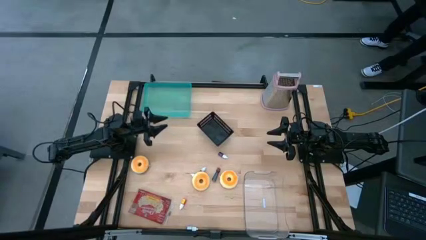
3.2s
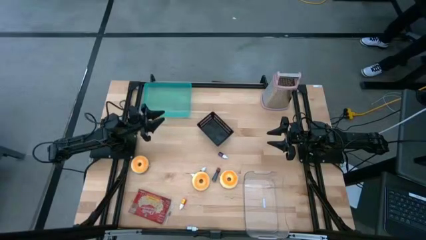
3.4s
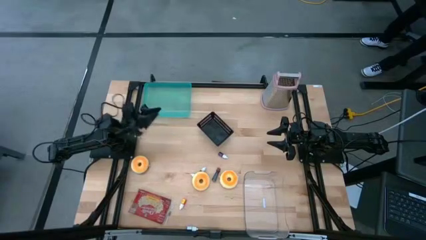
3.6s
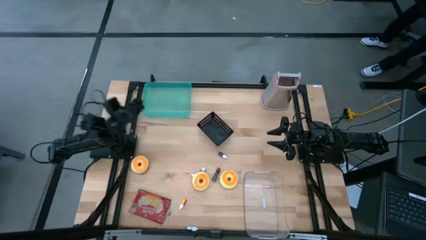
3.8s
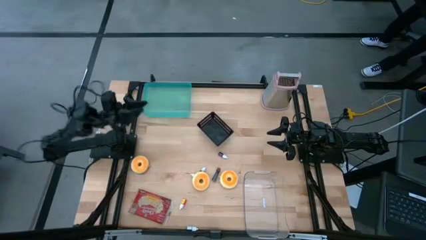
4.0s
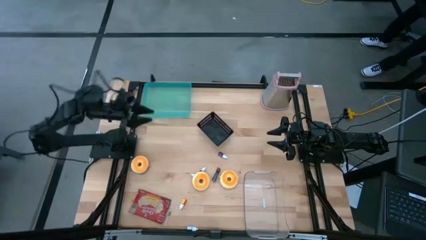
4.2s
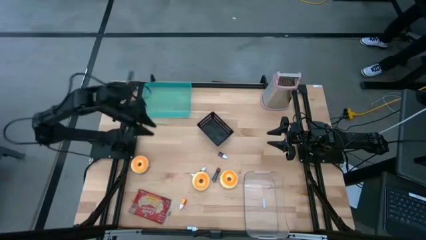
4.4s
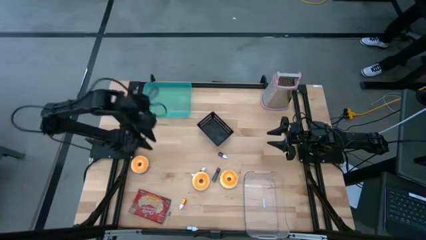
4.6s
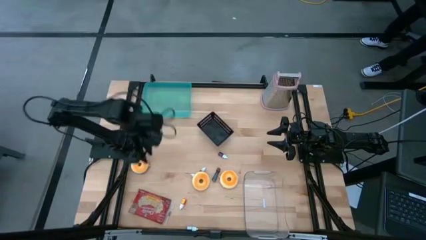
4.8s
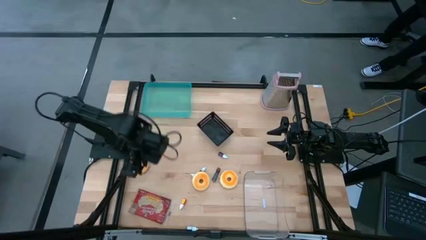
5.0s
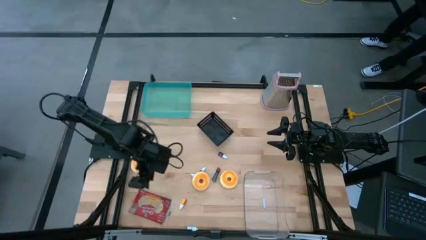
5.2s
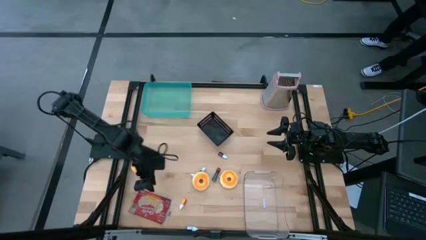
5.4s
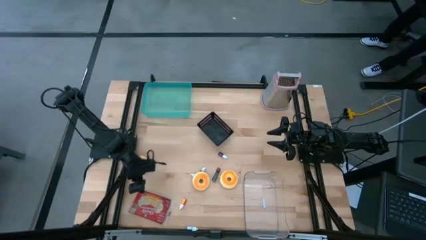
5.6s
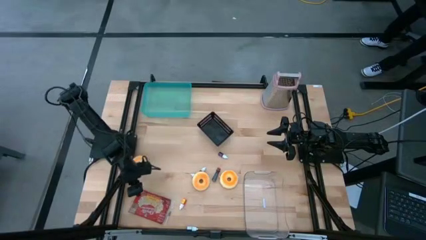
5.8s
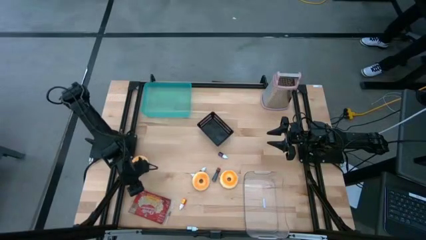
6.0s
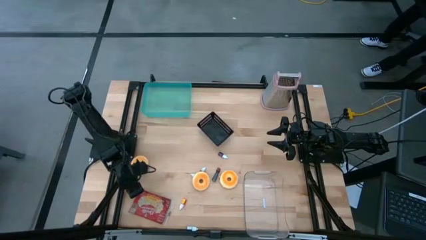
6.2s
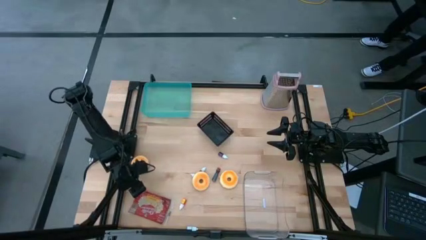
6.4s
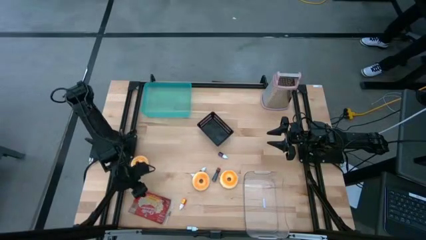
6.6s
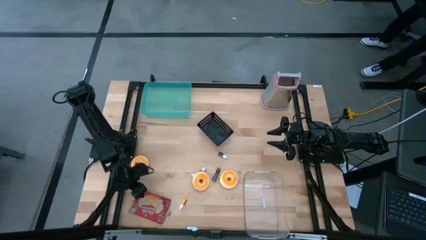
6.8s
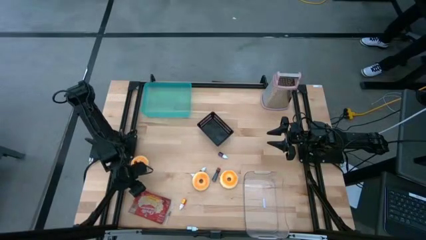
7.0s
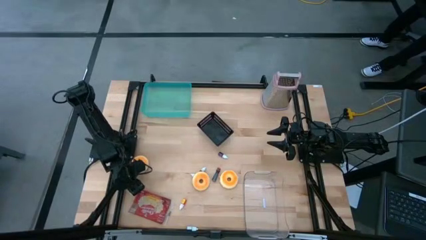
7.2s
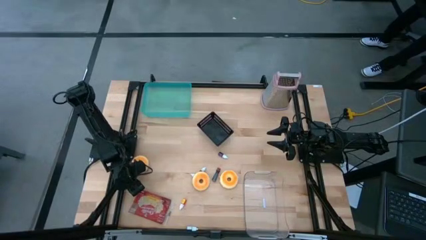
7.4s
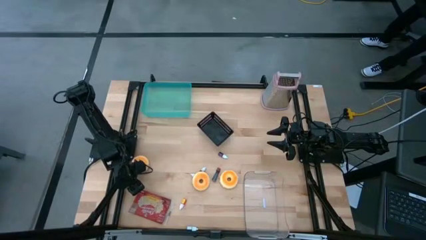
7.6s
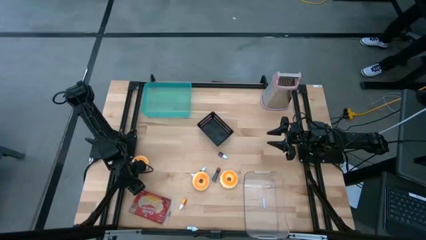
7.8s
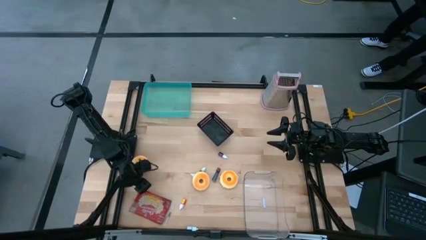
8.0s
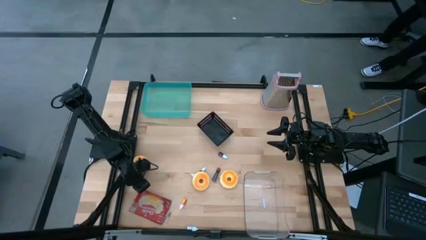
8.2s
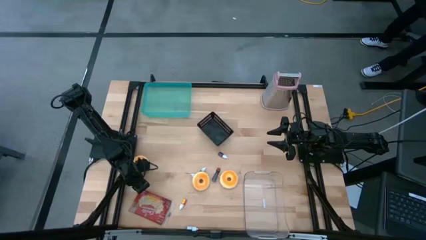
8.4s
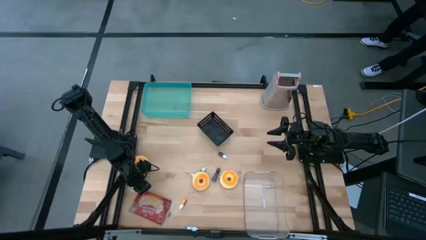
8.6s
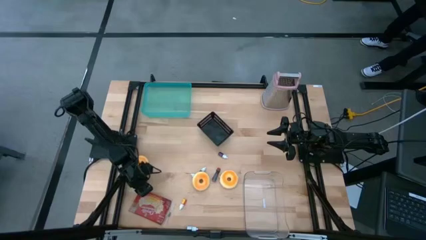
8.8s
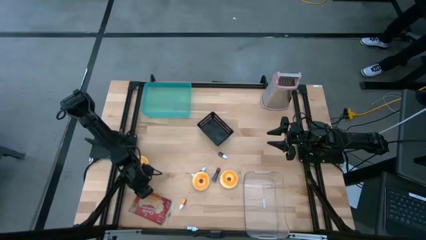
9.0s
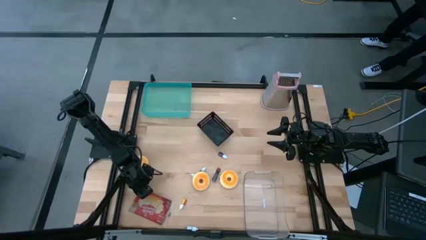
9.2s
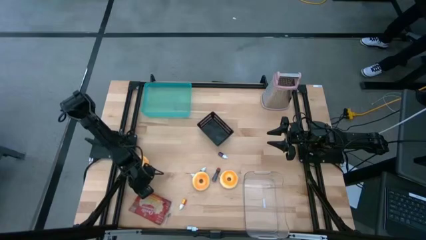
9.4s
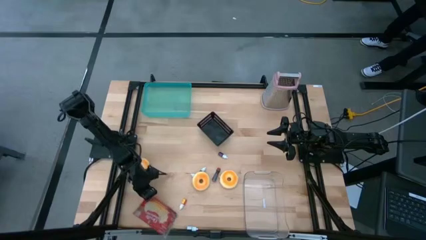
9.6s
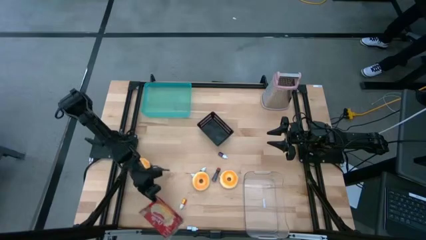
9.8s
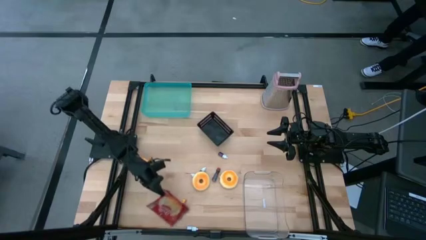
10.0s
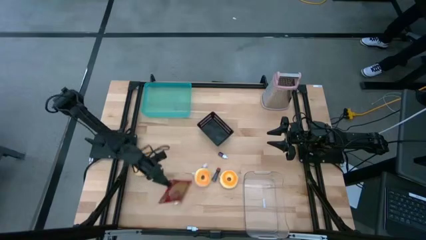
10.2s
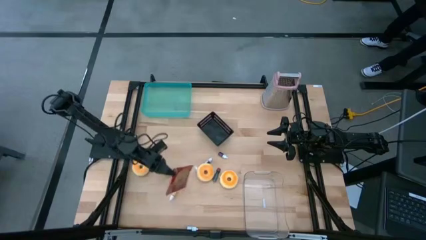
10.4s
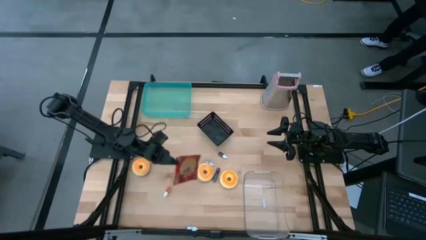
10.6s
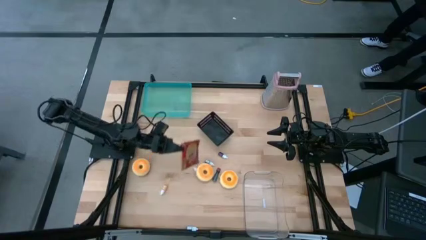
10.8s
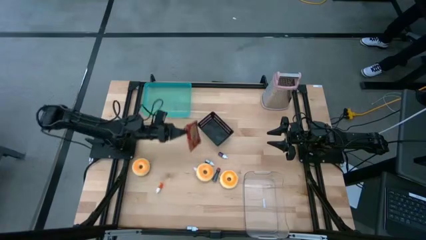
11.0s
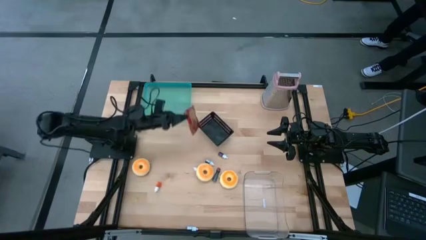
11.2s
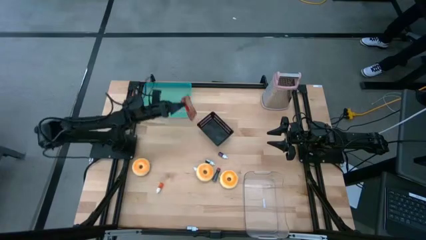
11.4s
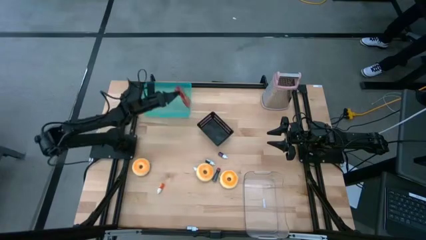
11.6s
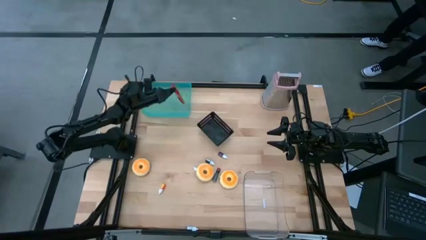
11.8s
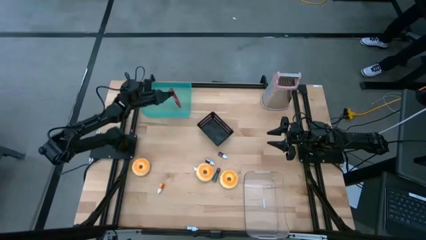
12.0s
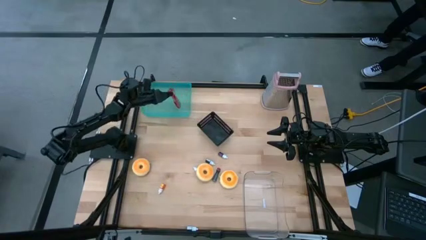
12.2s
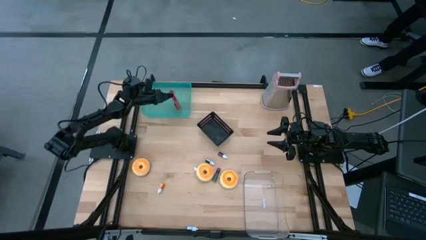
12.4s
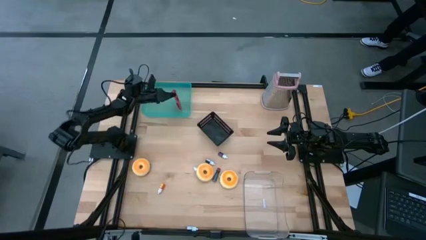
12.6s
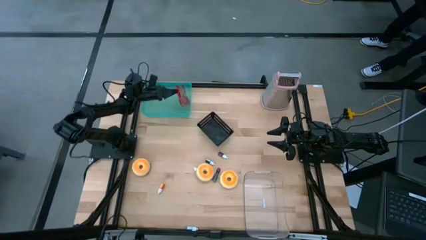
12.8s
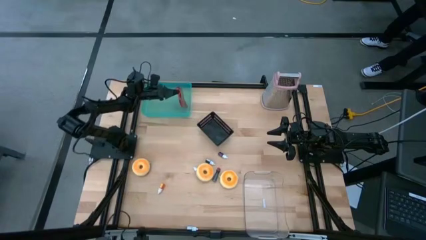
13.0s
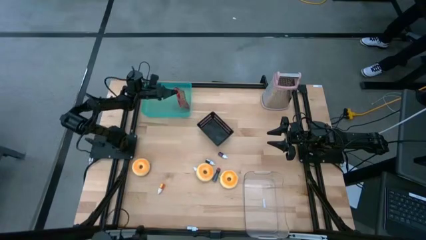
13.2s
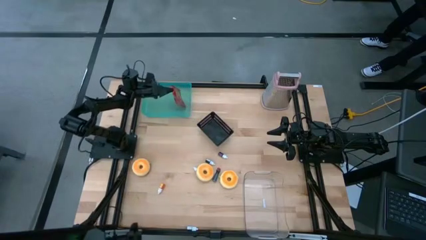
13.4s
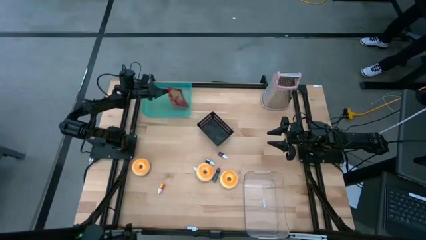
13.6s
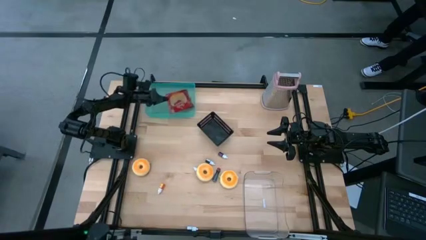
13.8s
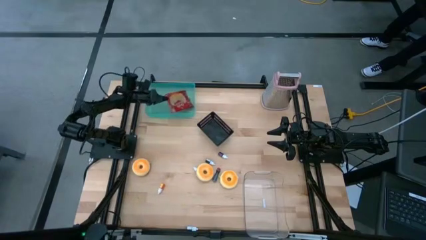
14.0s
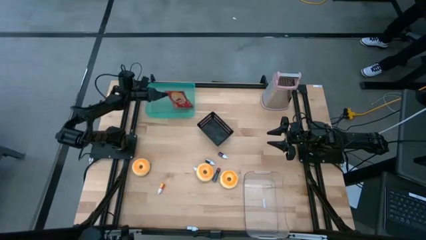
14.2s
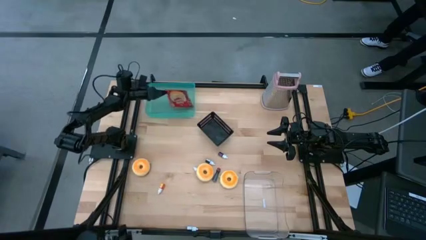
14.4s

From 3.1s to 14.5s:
Put the red popcorn bag into the blue bin

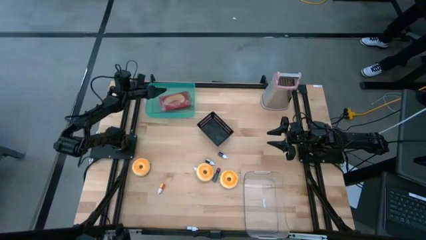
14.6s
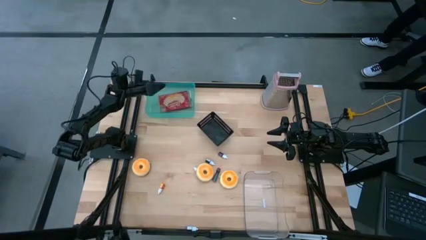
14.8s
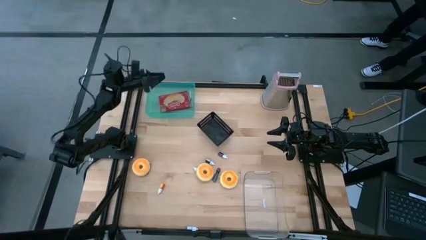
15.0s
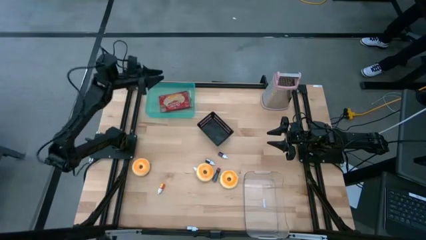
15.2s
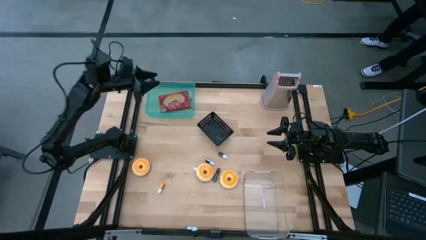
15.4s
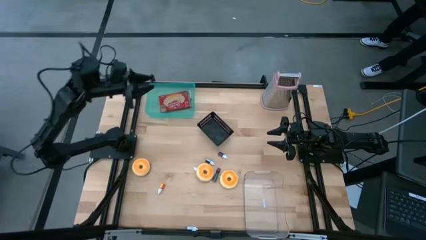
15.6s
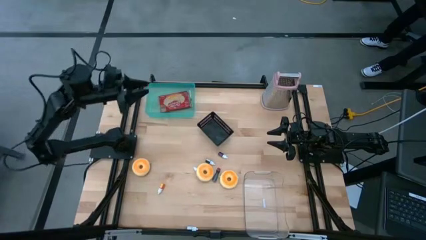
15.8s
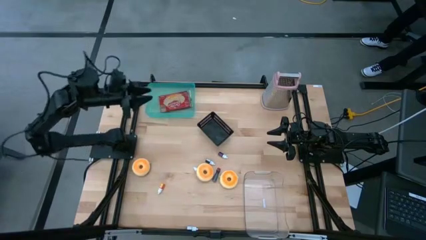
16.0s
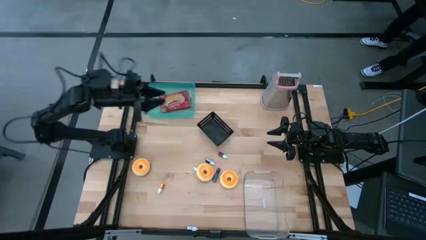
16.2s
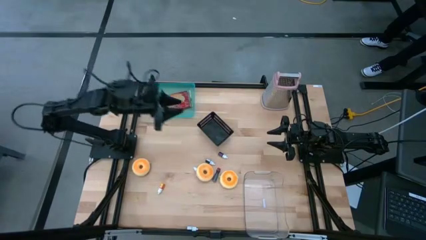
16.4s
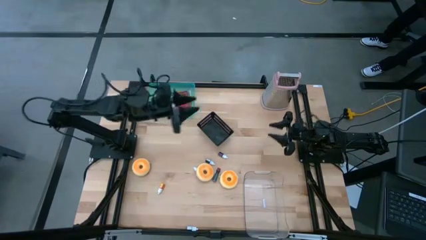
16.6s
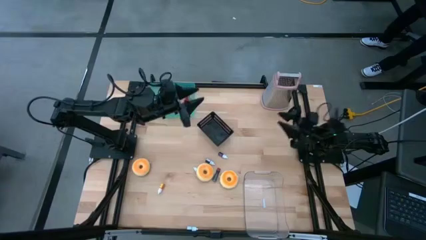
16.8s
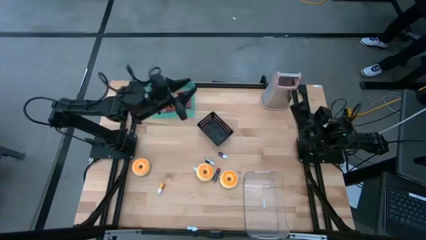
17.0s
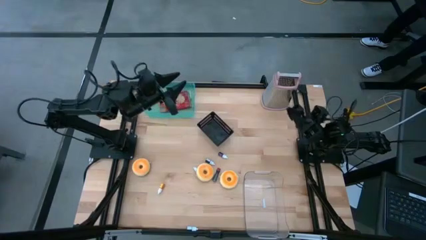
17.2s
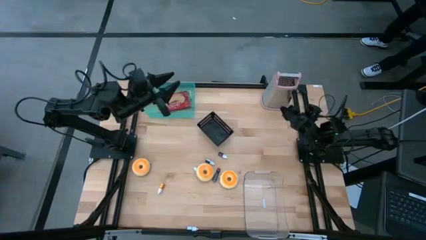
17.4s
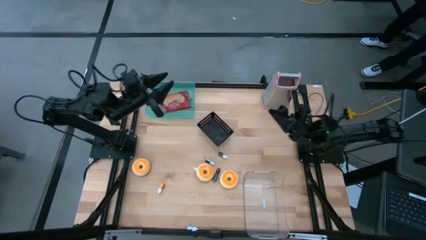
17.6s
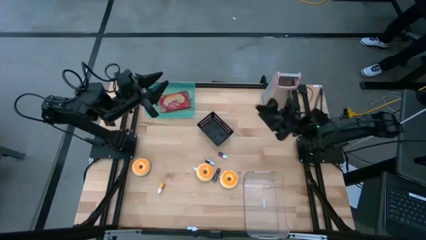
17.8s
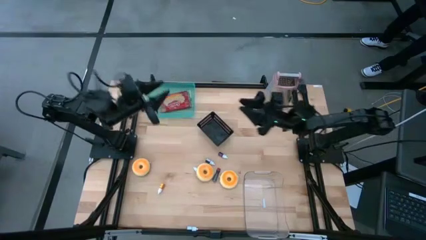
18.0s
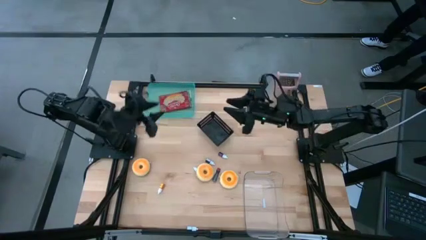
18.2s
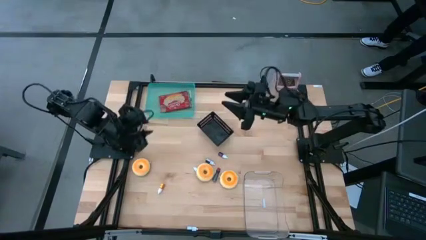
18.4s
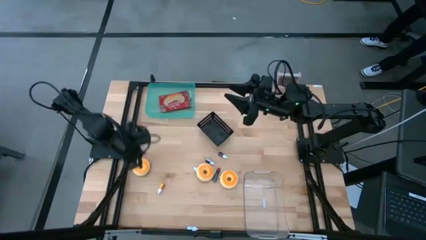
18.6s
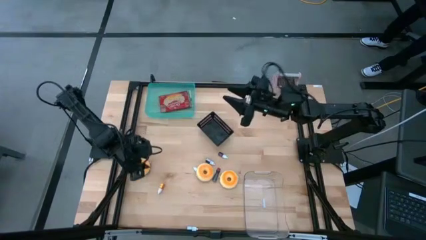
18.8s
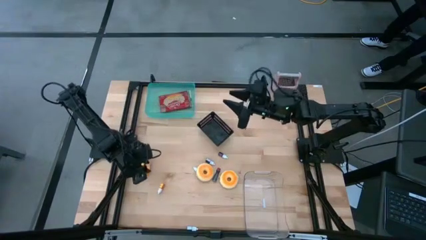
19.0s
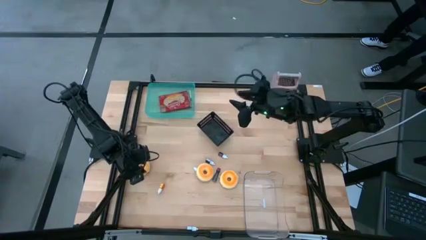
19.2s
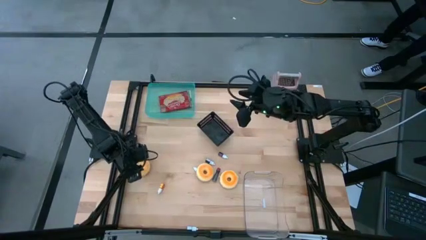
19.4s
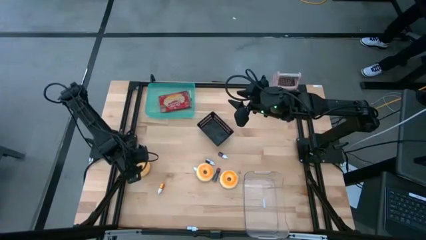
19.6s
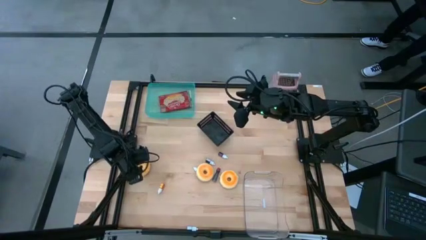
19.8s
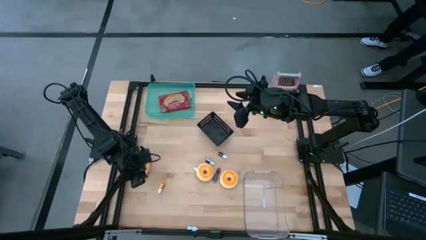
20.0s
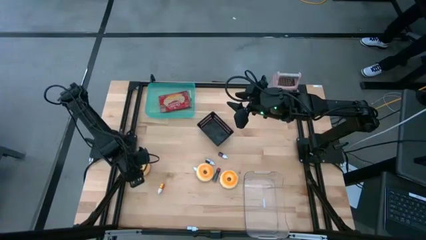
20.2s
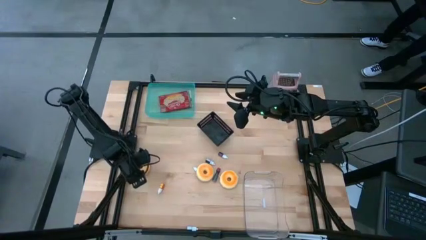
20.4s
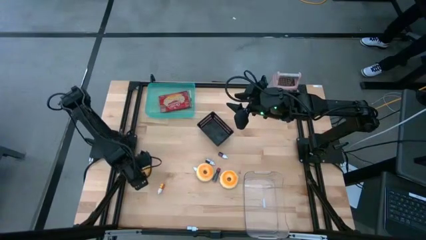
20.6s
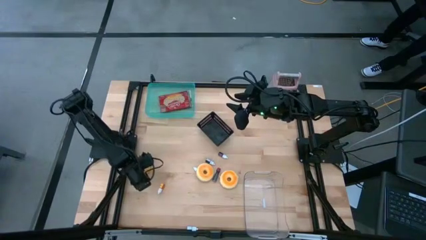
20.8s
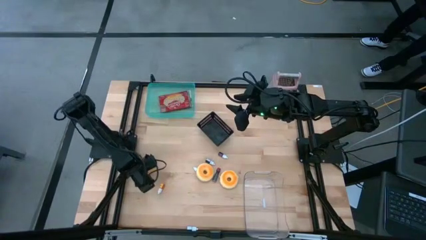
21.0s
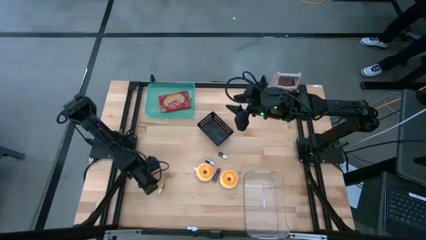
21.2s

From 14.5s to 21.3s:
Put the black donut into the black bin
